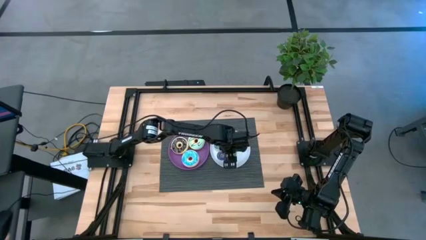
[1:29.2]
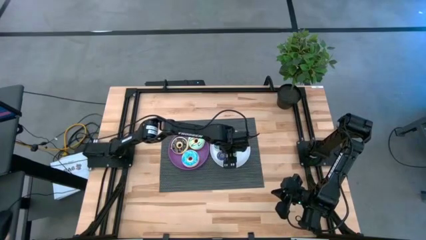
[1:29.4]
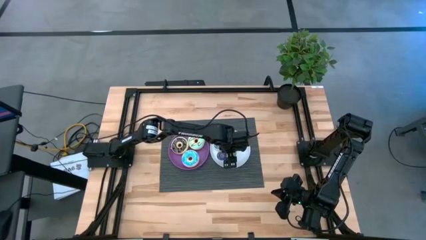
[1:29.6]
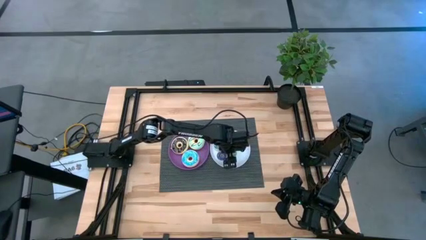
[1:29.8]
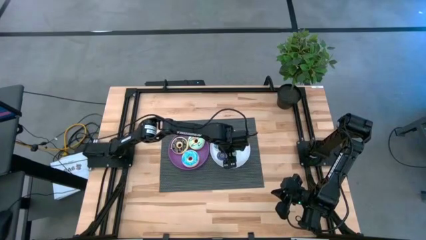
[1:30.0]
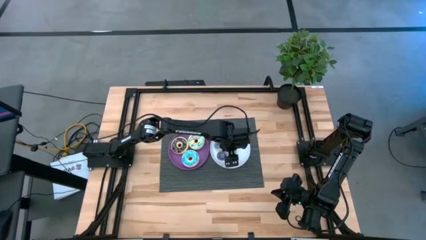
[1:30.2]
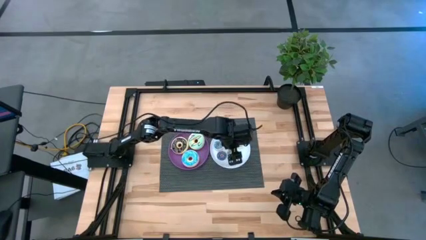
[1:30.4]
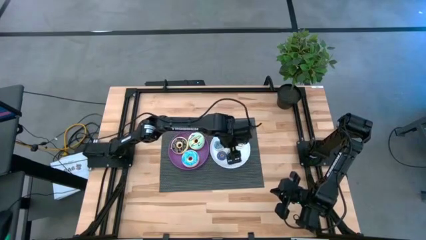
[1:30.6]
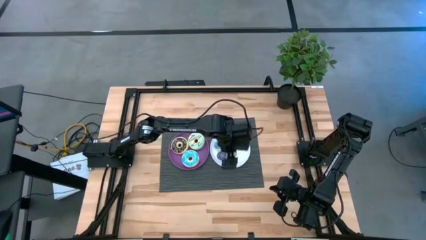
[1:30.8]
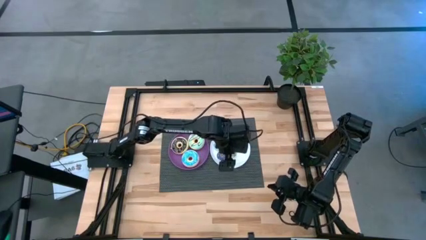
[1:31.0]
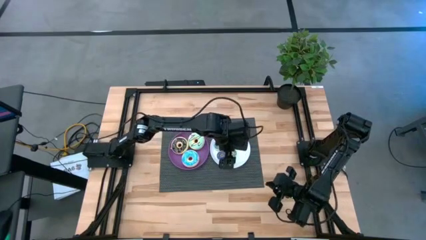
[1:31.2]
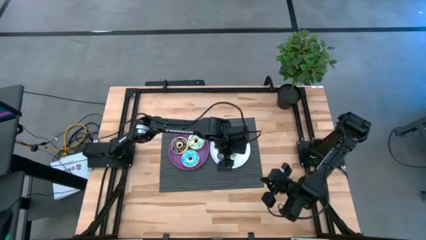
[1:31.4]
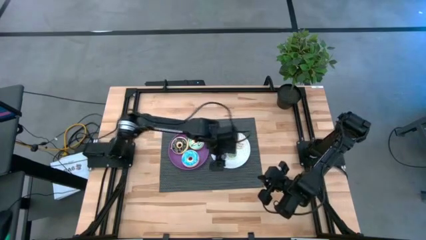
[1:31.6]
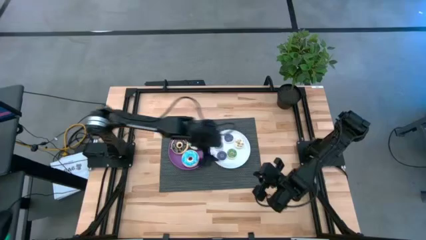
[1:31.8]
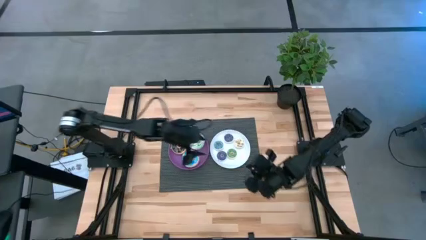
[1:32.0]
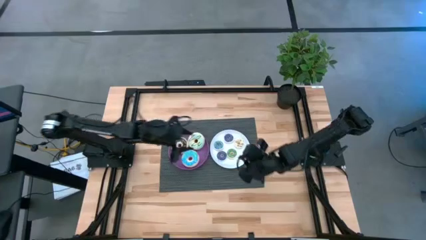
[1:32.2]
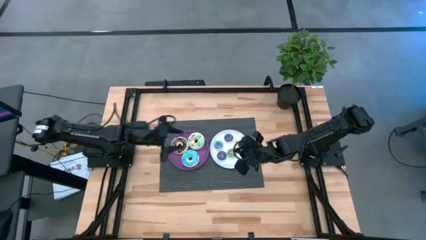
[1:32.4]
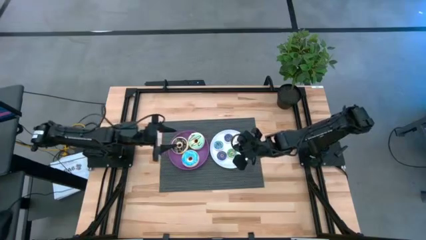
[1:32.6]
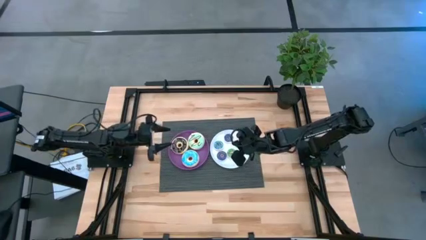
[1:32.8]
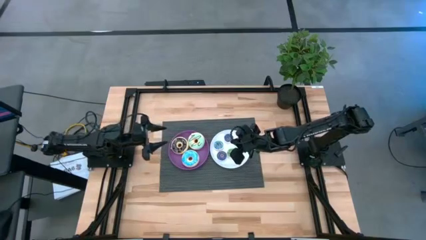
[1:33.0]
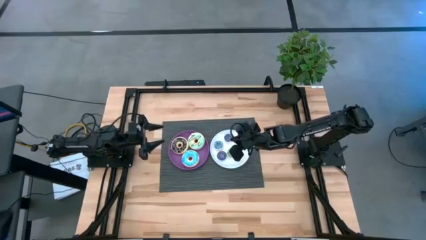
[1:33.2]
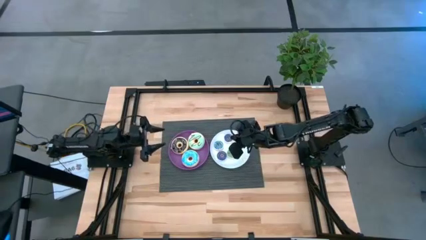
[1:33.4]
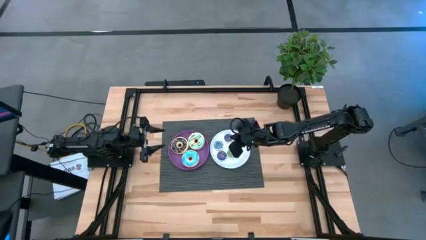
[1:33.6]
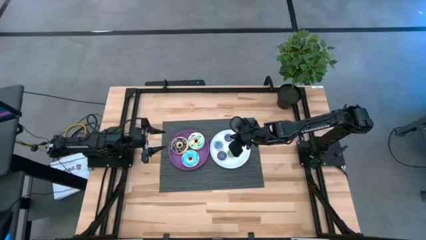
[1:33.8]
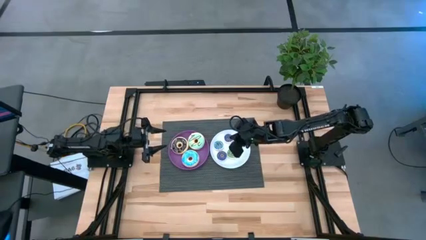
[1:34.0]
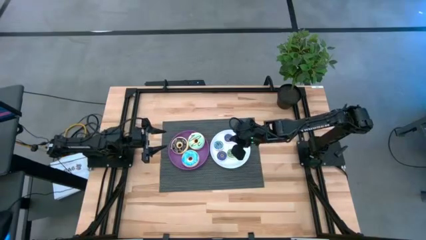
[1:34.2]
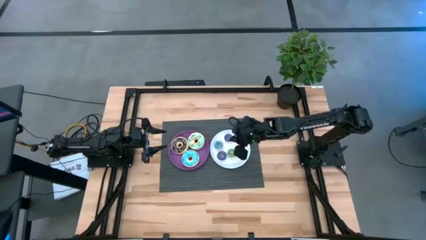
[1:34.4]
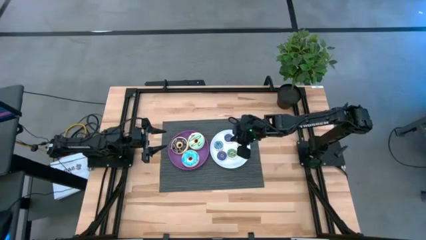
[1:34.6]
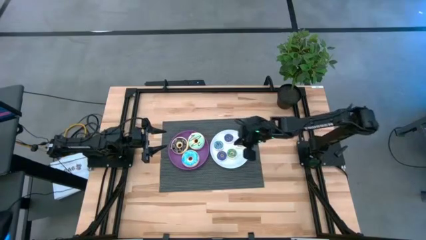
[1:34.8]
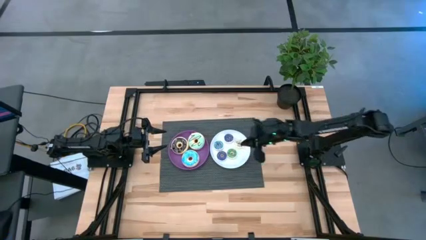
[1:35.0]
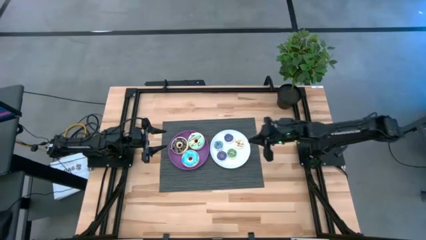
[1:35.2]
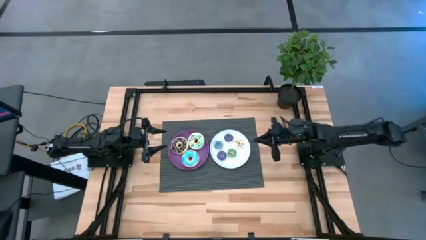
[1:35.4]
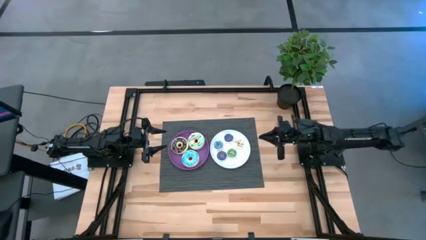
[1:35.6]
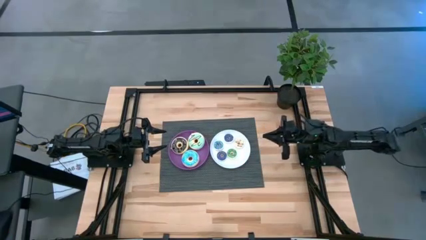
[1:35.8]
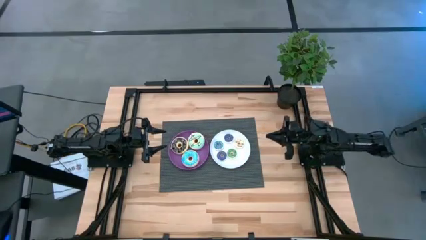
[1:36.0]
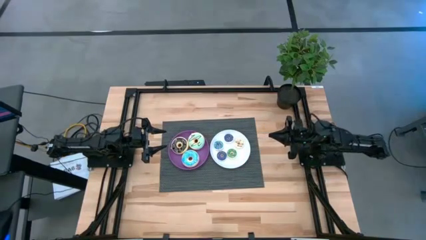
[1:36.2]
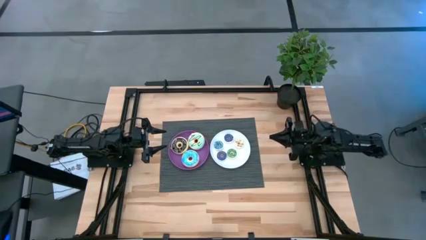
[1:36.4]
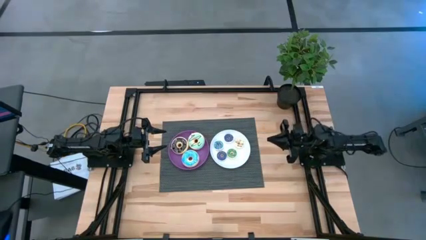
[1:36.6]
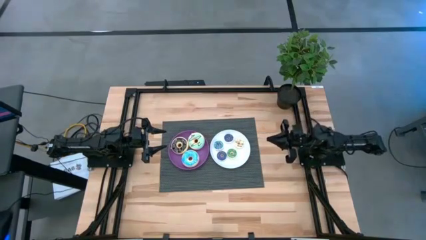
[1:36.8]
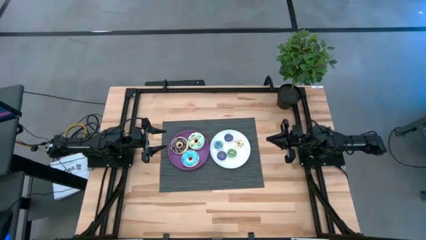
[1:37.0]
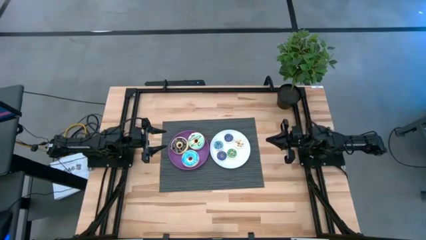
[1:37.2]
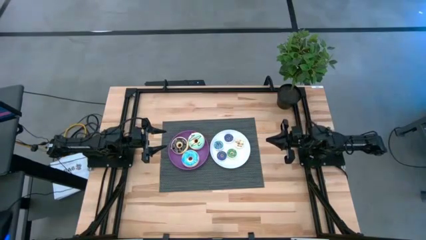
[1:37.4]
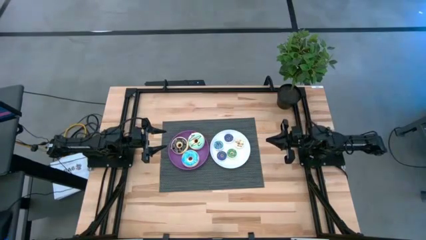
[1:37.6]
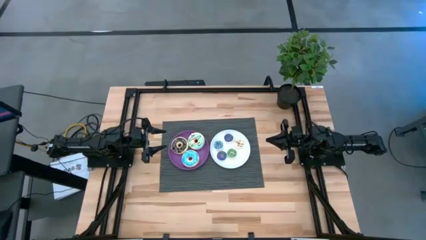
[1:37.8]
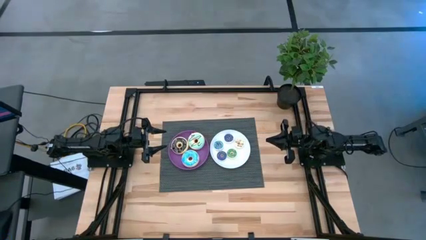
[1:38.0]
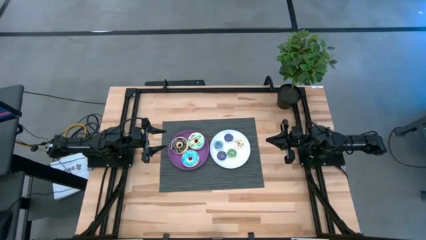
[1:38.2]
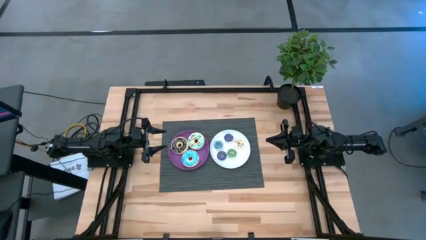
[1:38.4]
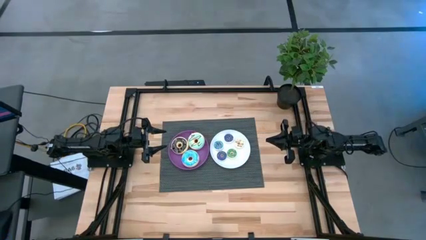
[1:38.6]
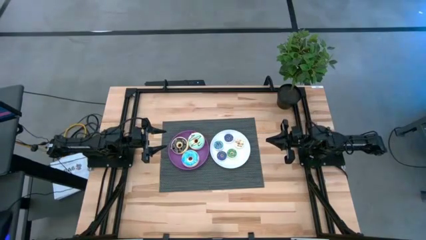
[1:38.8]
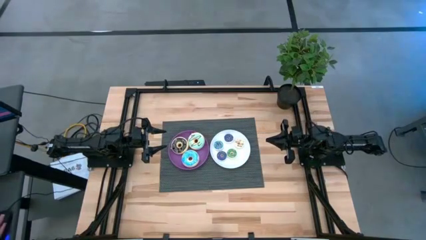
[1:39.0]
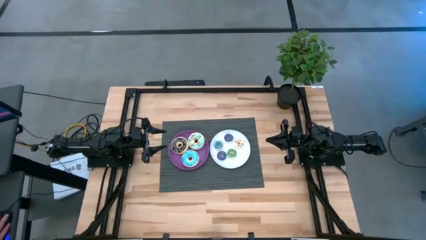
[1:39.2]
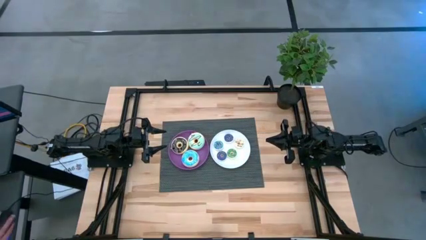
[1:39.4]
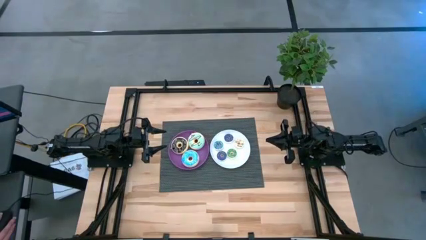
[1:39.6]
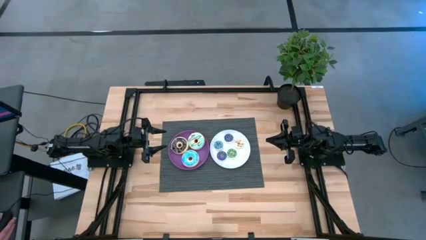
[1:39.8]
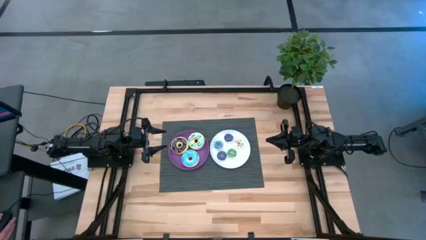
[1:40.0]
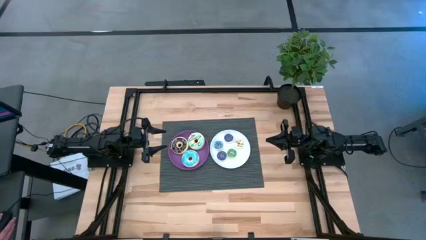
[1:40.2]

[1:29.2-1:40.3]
Task: Pick & Place donuts
Return to Home Position
